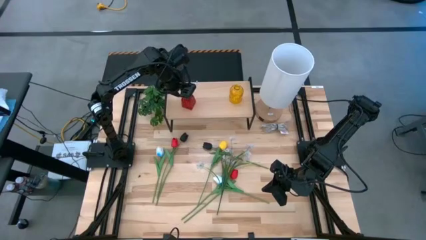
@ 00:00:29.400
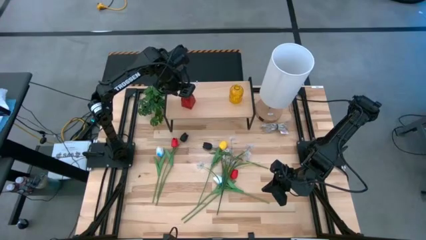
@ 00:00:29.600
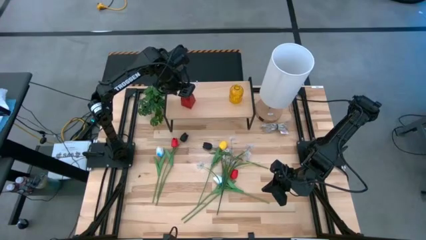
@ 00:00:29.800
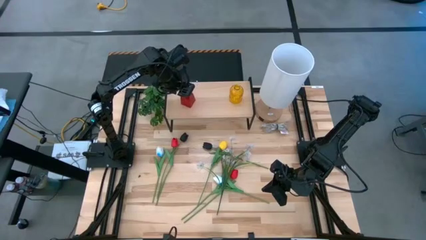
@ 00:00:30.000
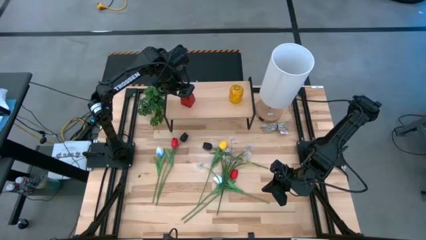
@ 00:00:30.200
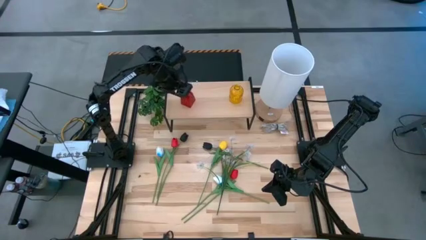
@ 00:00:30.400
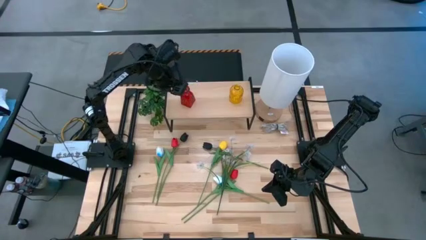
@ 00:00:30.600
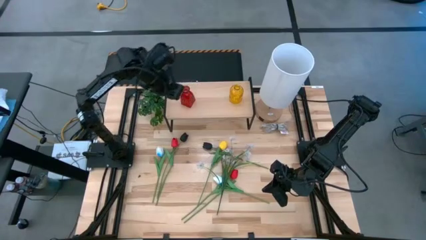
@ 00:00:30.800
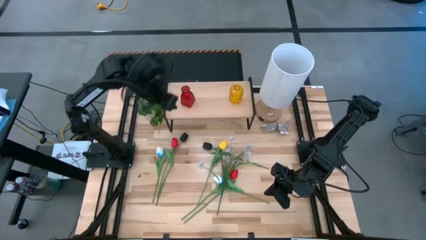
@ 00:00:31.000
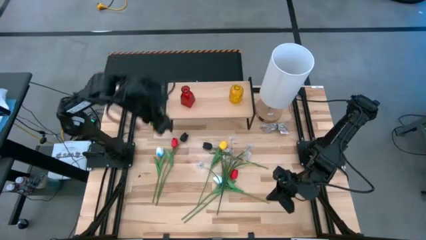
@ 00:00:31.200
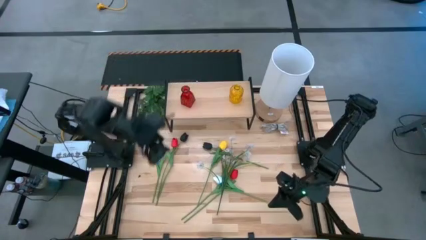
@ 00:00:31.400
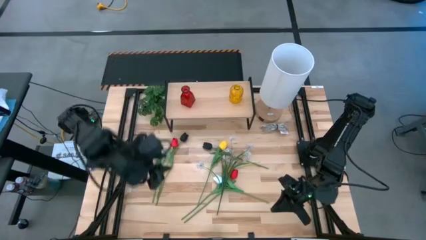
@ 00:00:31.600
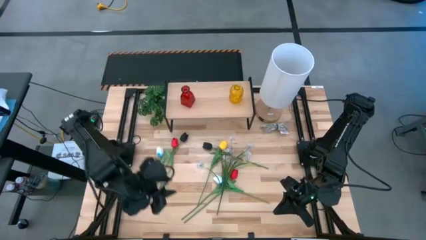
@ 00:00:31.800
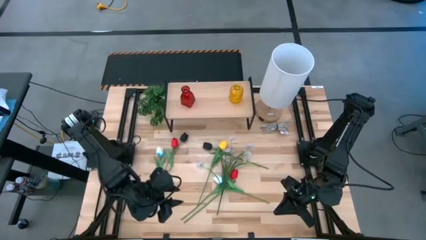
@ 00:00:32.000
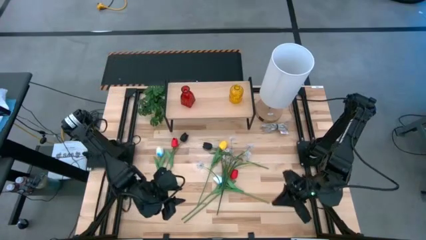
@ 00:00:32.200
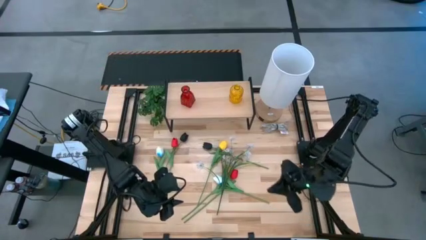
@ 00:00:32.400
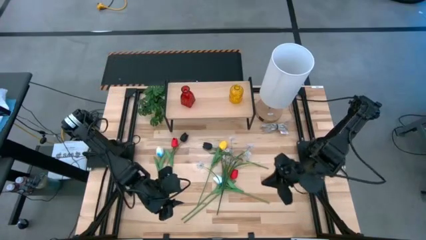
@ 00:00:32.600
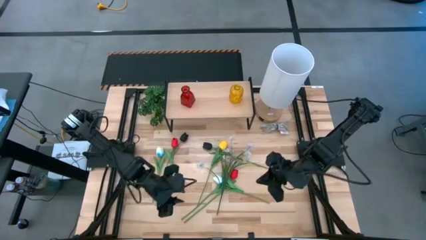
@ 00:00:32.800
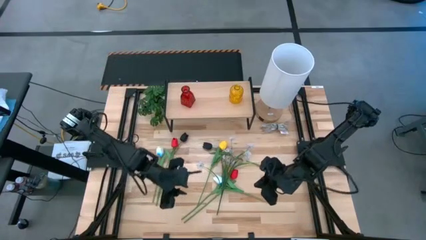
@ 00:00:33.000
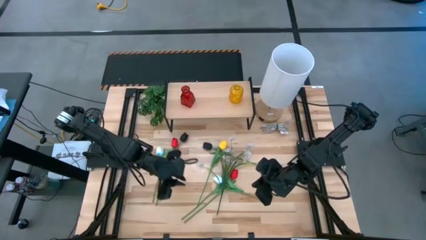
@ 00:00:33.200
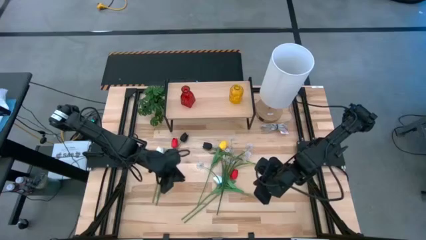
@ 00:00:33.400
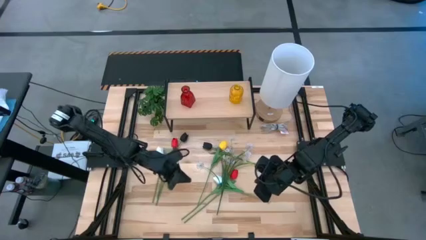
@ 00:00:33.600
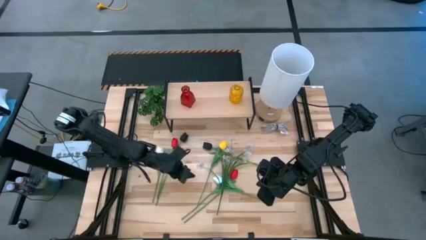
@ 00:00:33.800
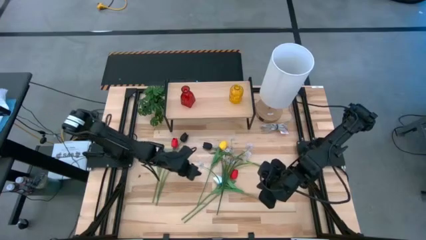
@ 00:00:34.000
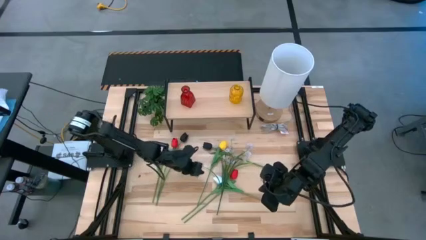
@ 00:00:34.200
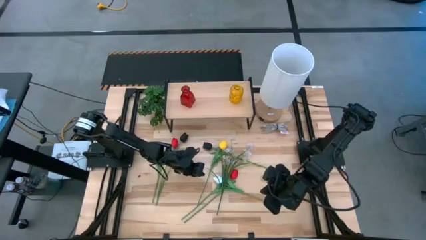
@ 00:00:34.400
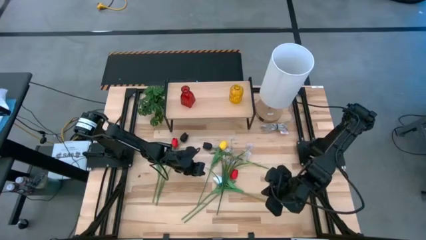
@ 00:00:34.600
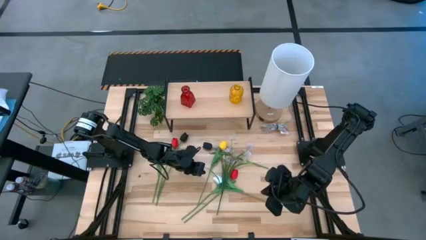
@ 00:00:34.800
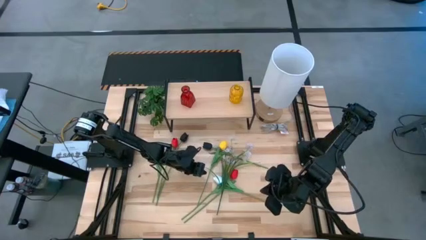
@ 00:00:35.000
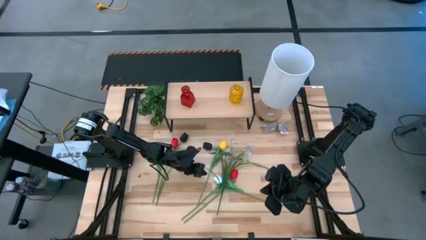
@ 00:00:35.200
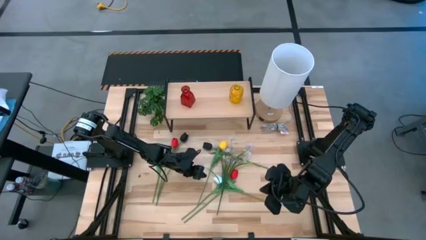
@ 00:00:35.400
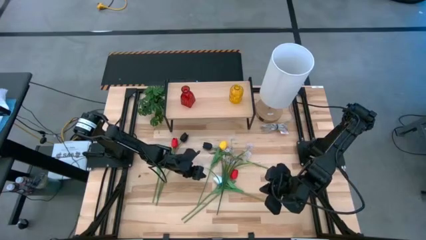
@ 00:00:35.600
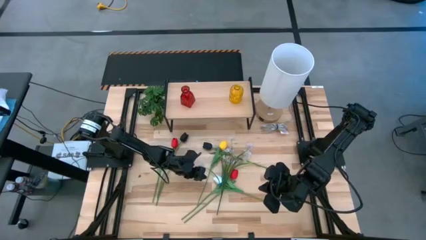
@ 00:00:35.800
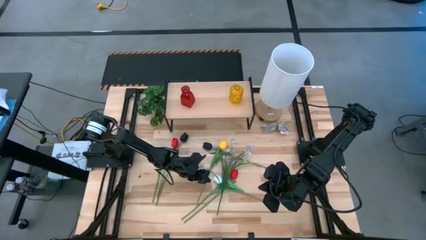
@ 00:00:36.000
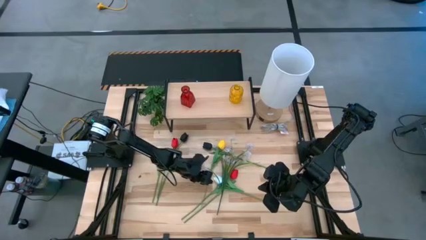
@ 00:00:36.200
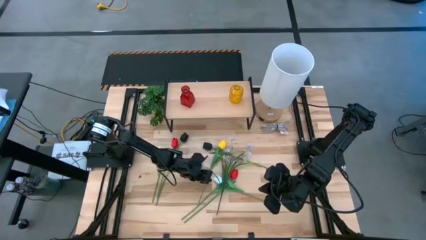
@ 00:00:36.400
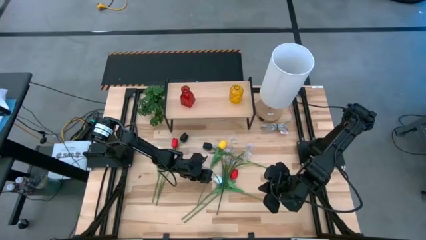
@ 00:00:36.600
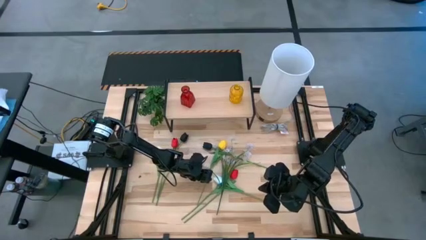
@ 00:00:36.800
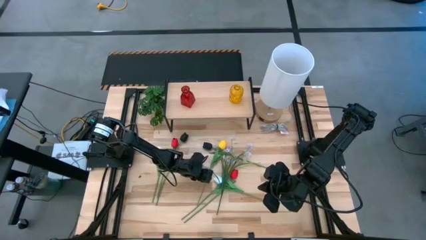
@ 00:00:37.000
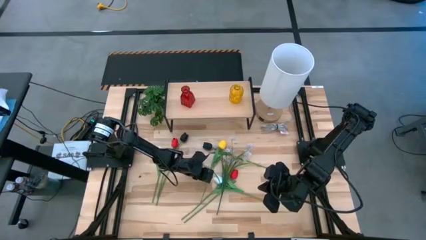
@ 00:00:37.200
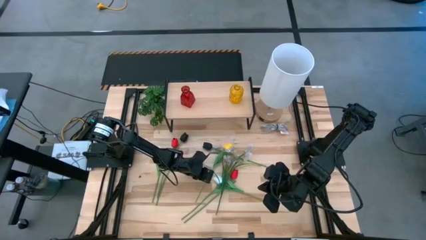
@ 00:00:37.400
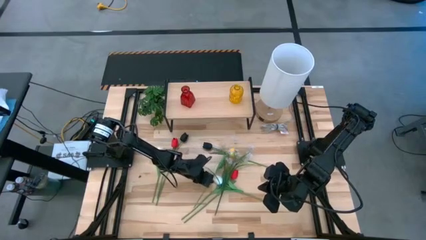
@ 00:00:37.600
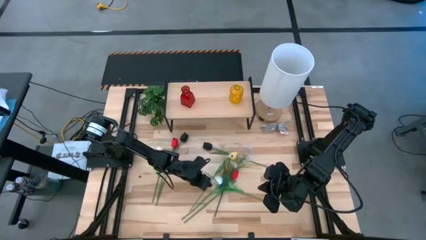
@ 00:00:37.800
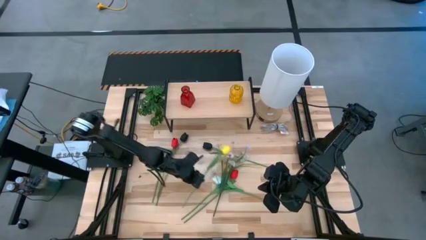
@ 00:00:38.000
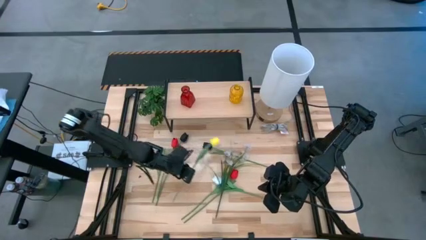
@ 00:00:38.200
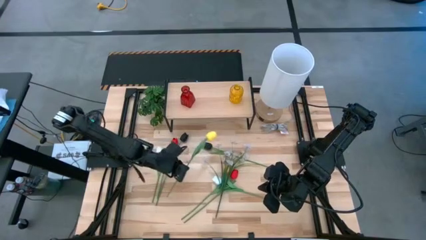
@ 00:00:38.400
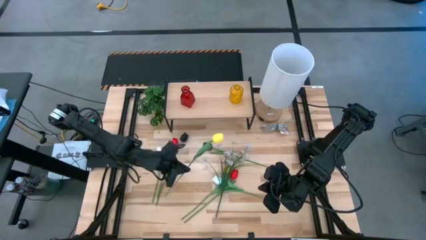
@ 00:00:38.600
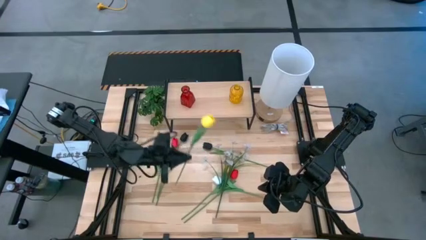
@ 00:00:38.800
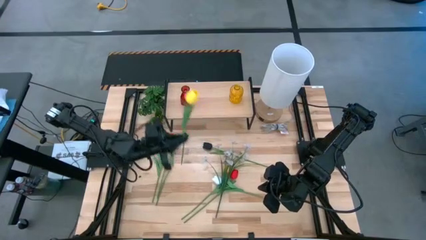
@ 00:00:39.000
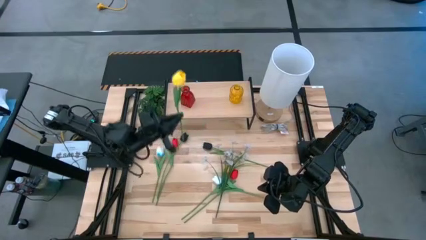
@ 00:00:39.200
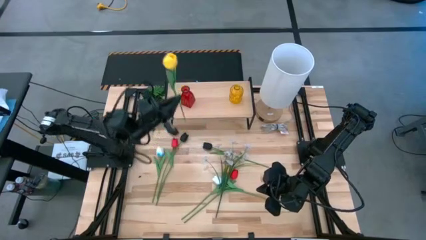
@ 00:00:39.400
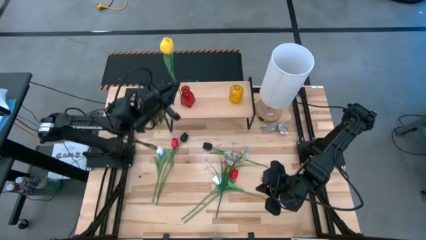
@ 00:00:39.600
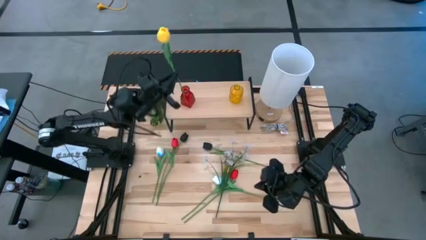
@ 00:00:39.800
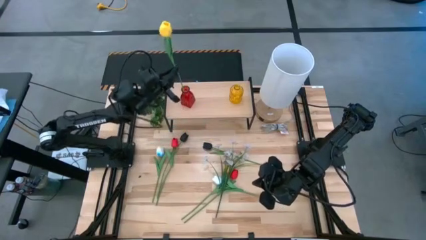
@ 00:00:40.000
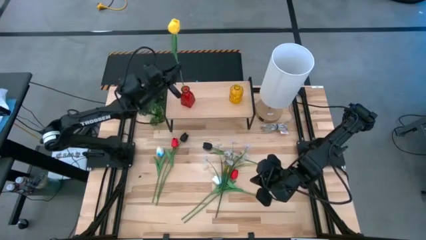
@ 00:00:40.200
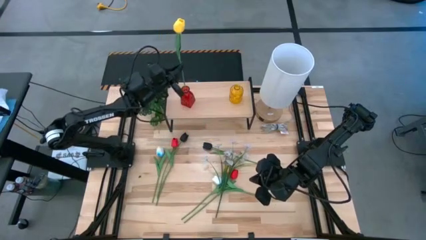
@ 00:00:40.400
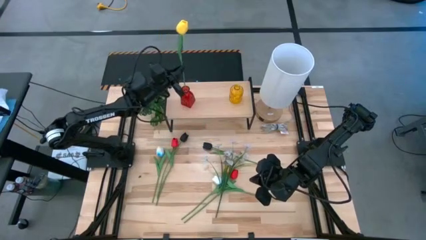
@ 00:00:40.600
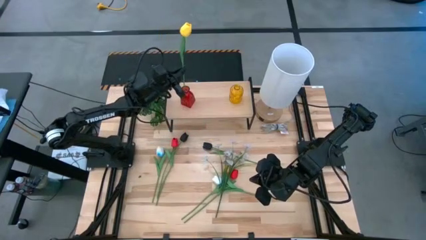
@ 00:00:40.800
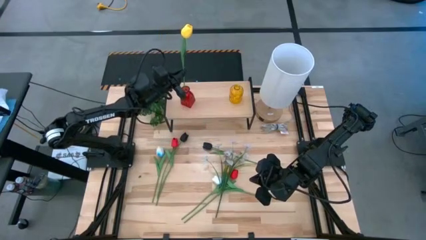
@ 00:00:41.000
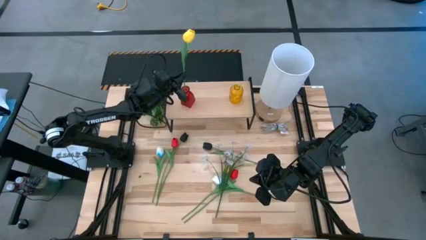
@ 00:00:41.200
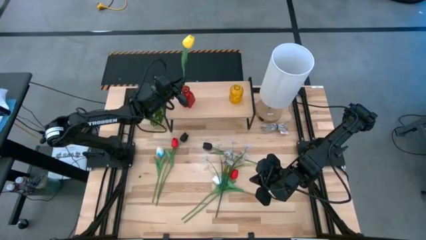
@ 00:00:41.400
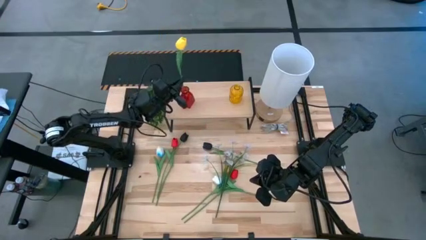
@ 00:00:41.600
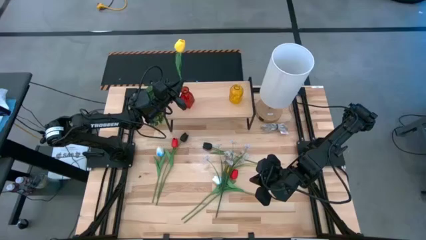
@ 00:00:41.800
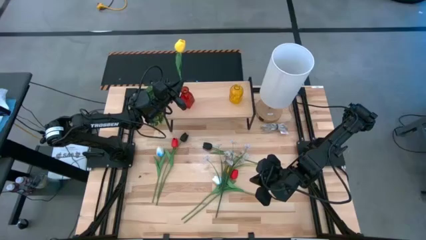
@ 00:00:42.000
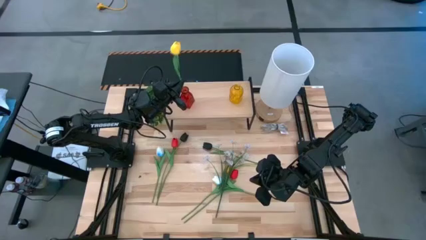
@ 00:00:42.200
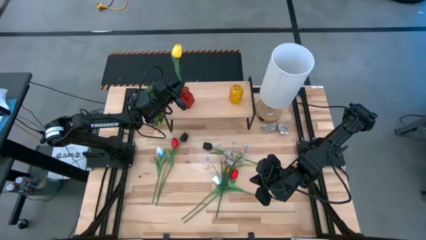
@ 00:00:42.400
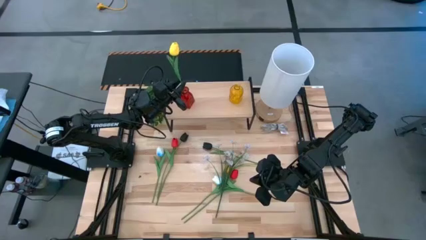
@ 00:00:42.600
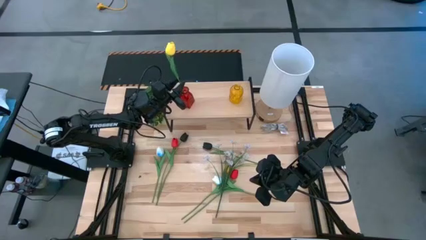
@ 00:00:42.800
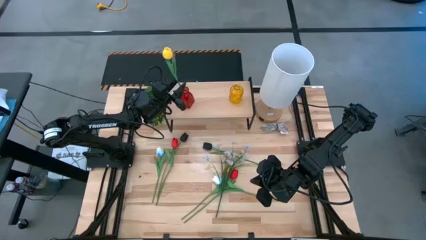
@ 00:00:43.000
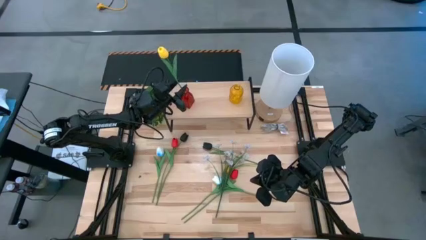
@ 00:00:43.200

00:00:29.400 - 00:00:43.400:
Task: Pick and place flowers into a vace then onto a shelf
Put the left yellow flower into the red vase on the shelf
